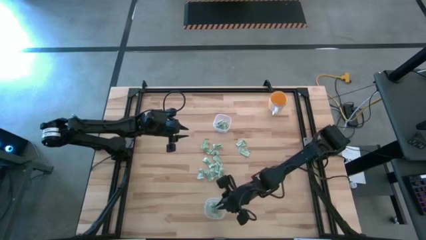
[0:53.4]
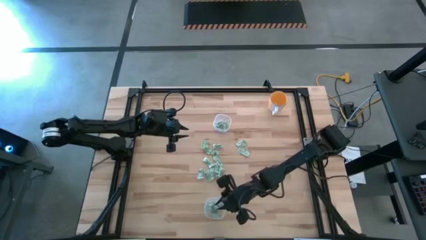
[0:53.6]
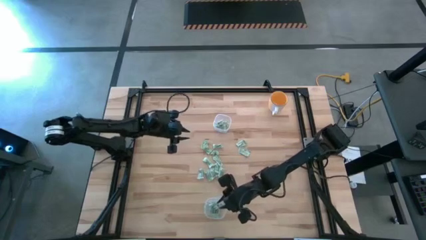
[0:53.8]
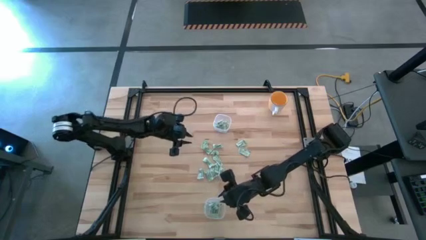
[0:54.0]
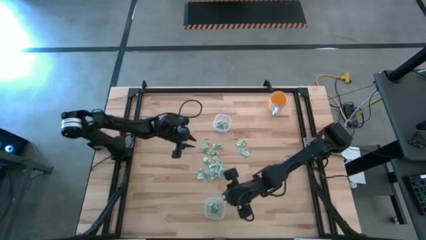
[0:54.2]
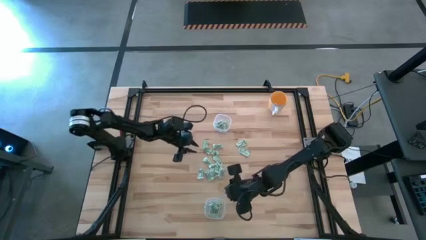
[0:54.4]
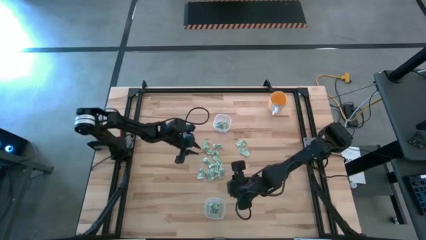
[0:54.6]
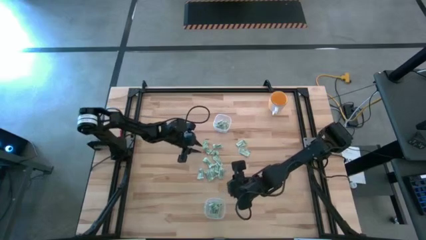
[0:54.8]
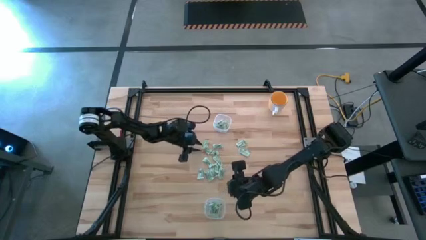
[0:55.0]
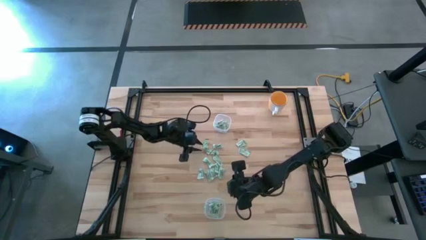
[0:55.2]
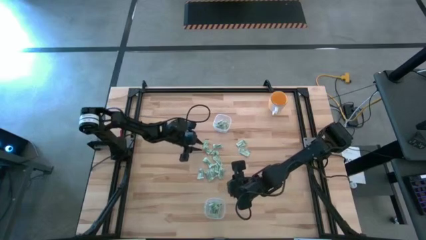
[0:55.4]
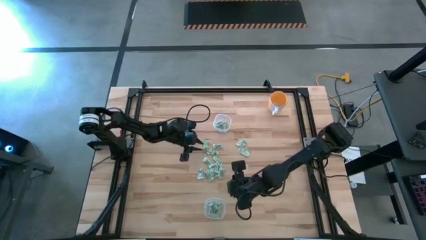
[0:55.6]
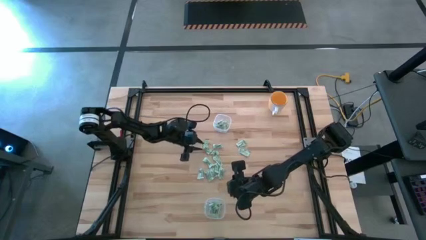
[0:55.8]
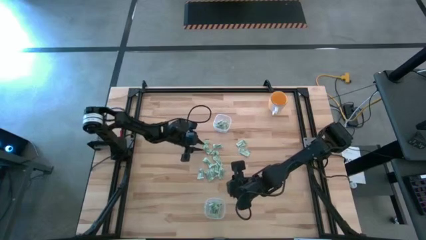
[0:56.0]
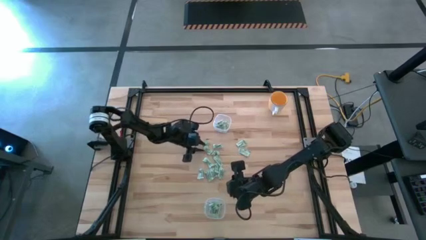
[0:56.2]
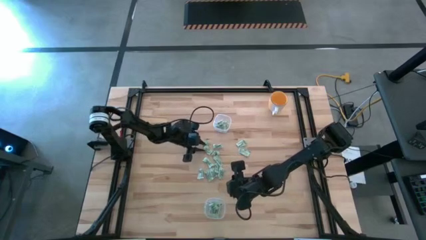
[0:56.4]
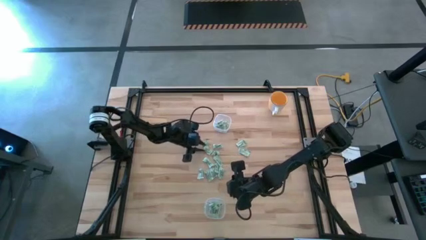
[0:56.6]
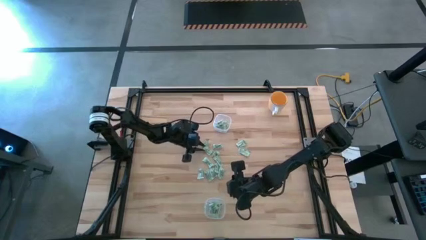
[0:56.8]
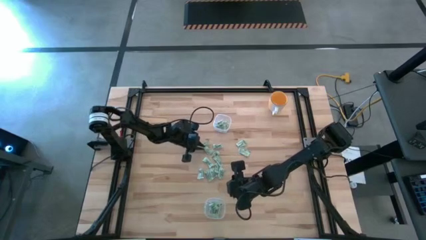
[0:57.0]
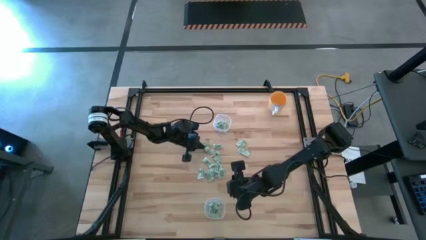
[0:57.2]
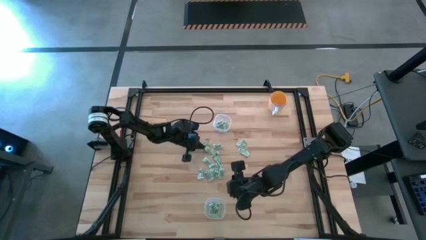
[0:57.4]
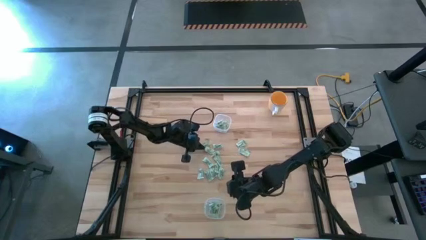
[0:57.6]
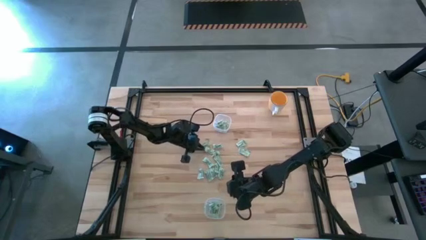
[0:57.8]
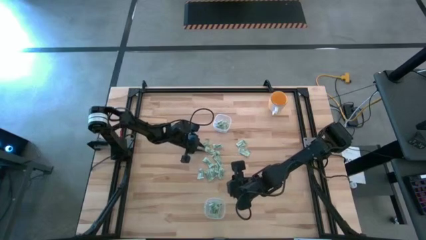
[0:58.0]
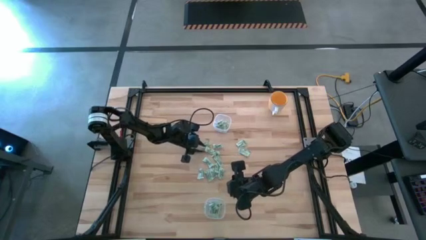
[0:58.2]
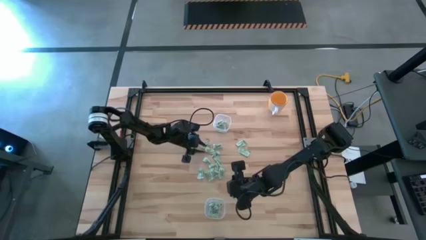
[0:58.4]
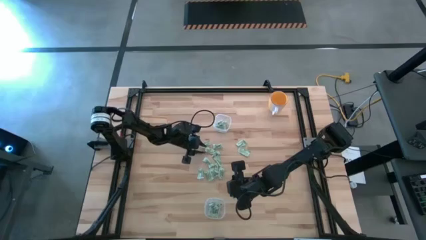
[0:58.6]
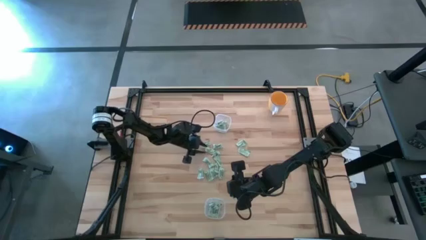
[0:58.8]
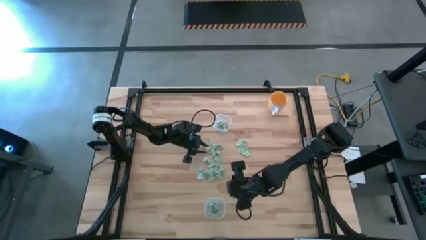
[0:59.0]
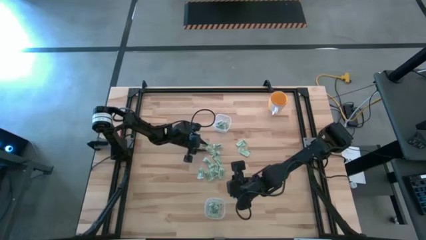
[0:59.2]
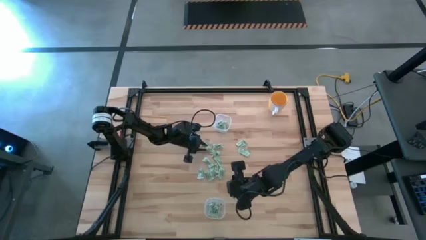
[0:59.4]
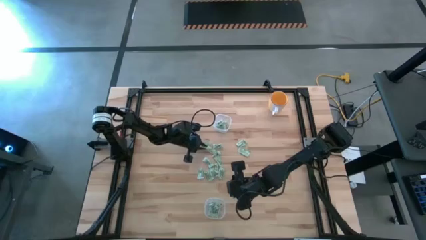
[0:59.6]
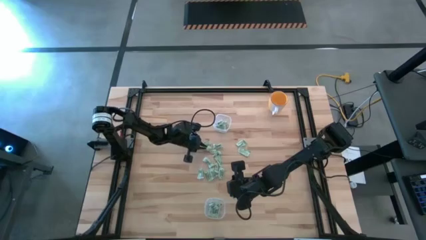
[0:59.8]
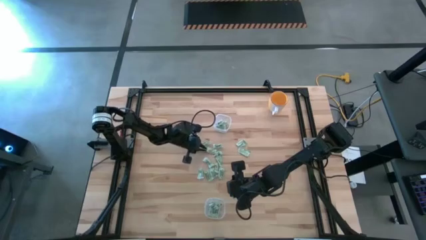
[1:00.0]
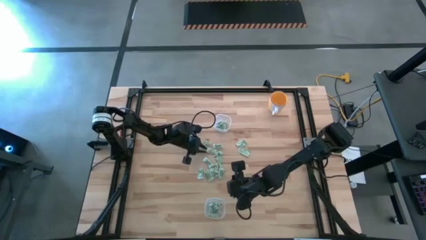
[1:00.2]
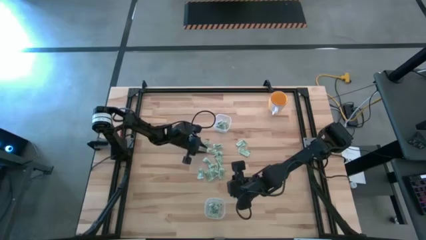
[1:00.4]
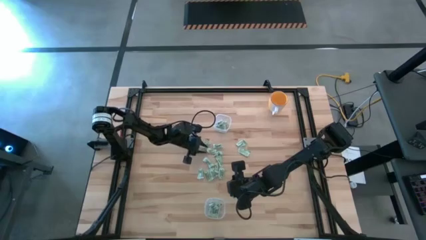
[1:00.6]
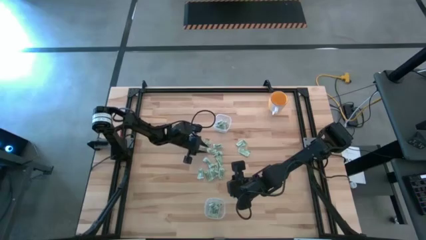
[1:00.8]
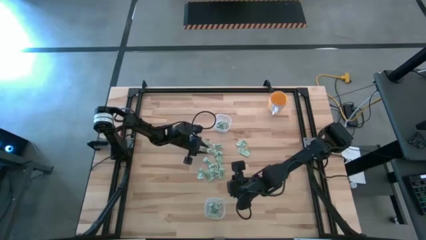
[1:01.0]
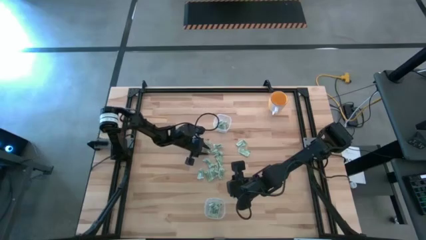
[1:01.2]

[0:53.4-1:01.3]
Task: Pick and place items into bin
Put the stevia packet into the top transparent bin

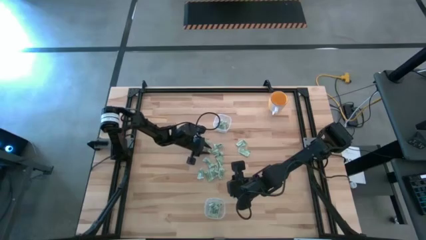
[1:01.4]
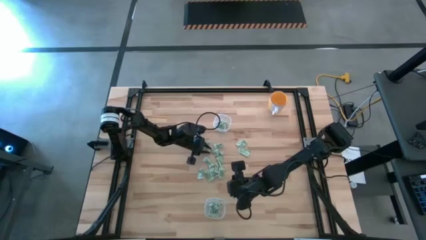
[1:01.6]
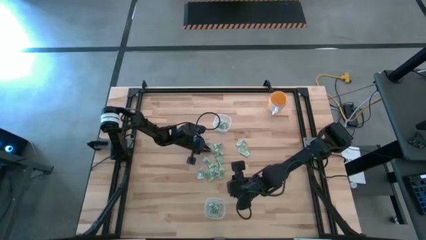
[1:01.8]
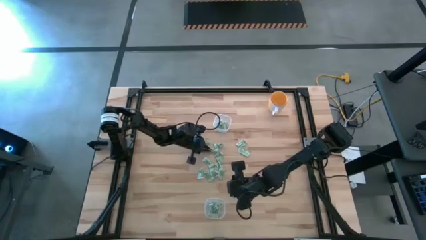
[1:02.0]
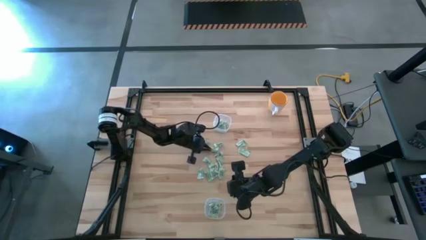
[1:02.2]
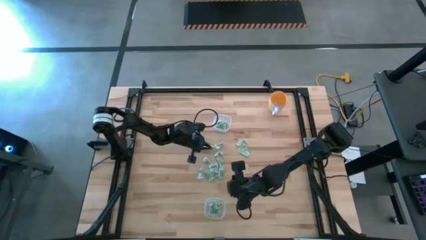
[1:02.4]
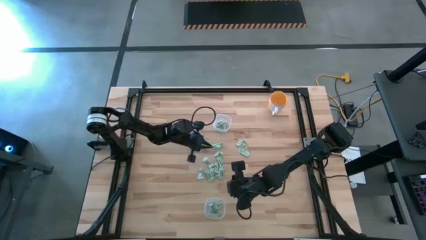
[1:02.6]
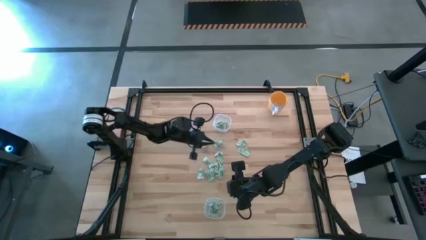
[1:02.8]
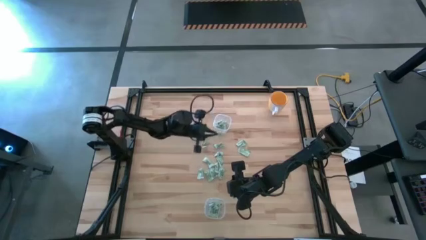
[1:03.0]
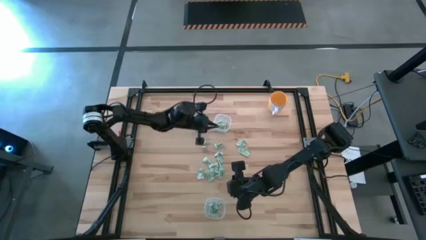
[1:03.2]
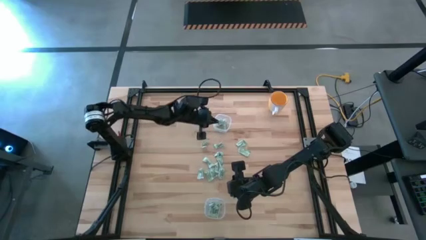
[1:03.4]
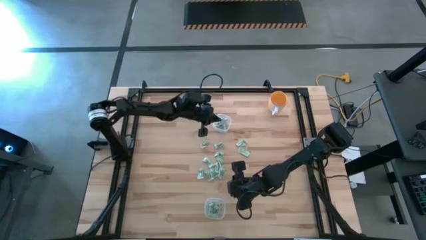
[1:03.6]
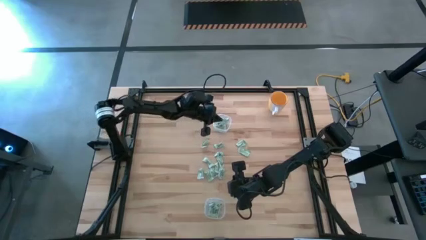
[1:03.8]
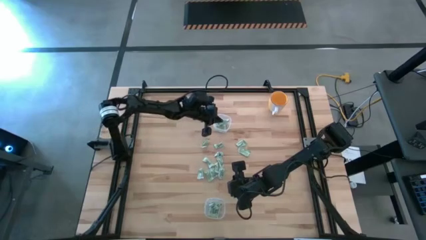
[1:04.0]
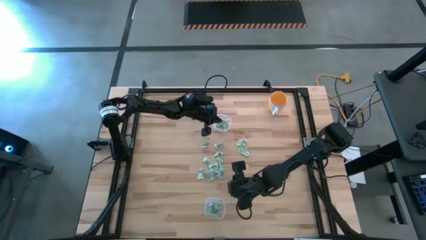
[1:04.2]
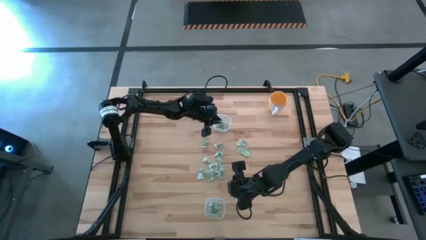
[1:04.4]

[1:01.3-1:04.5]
Put the stevia packet into the top transparent bin

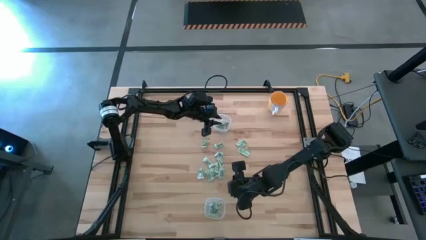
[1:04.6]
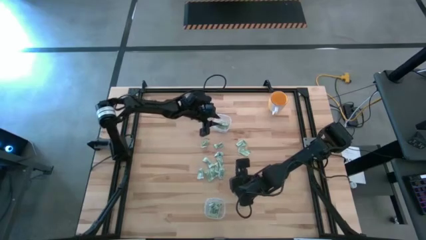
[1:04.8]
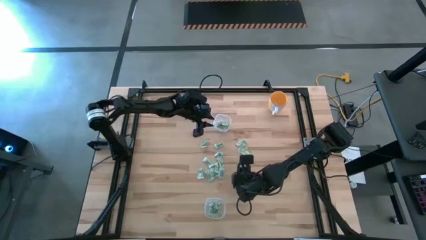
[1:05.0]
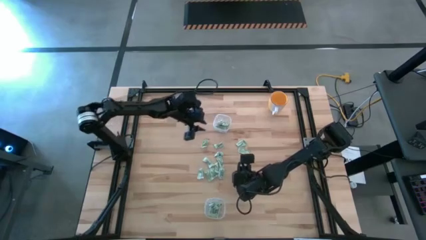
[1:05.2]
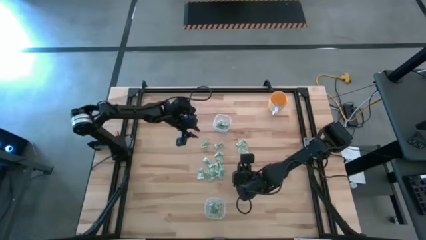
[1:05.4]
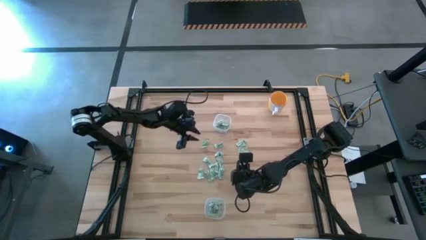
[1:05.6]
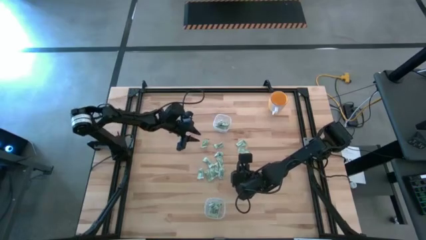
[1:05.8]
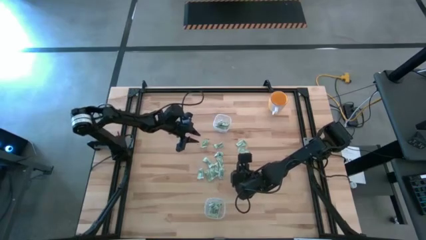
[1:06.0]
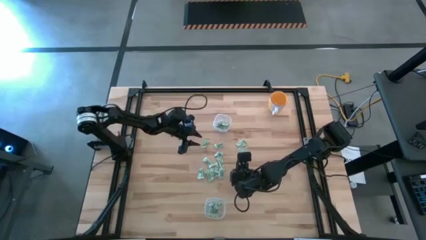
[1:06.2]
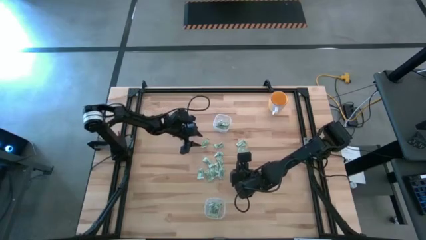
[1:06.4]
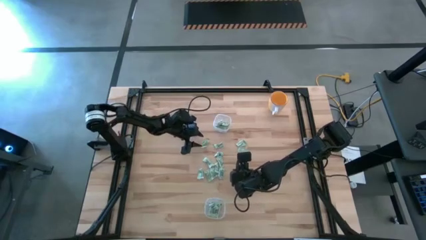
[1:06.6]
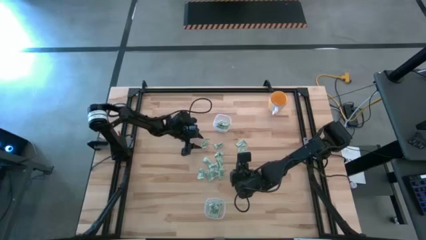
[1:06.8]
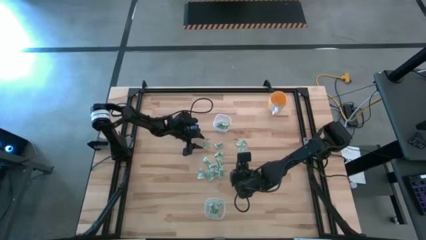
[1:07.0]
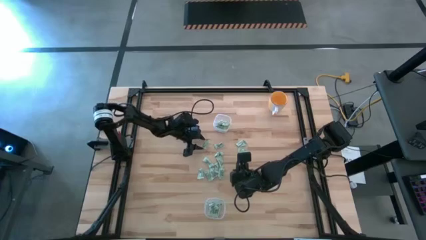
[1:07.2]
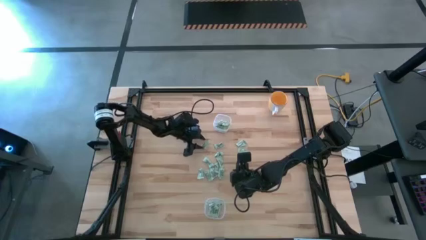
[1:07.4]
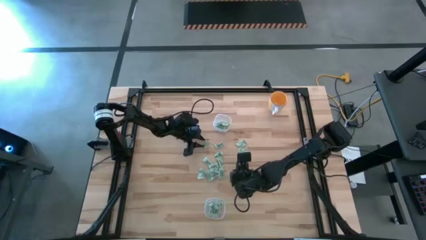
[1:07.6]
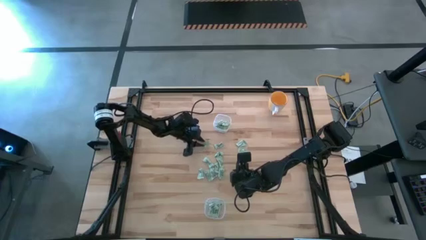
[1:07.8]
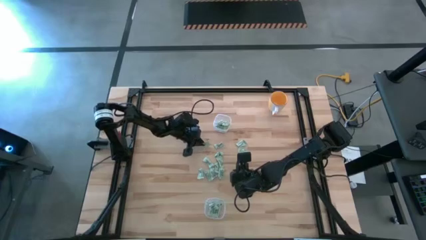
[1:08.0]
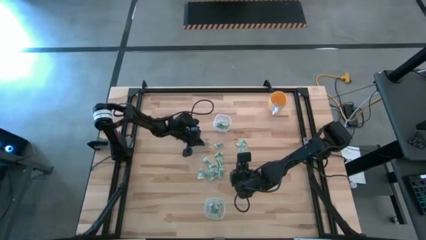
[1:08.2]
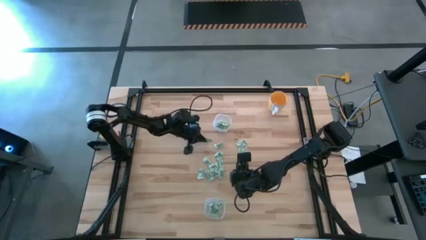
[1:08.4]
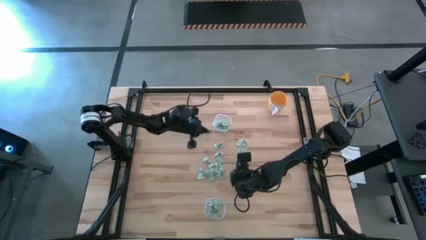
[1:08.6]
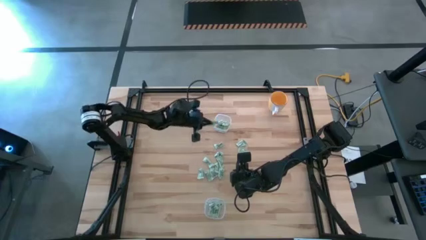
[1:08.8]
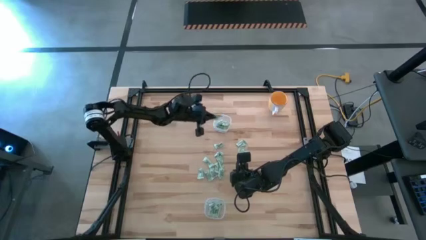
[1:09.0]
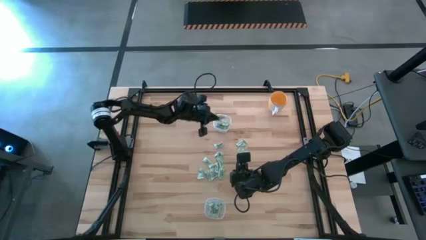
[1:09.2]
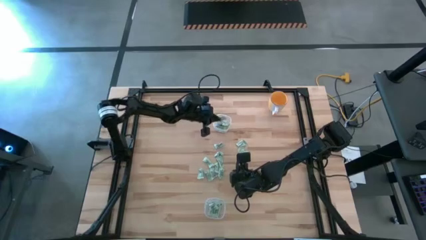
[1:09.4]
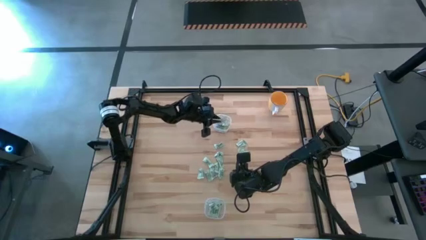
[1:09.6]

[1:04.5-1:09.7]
Put the stevia packet into the top transparent bin
